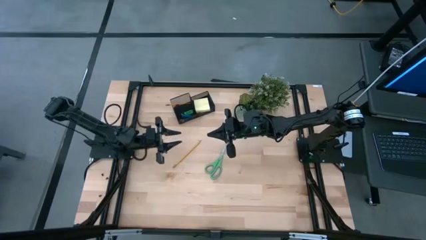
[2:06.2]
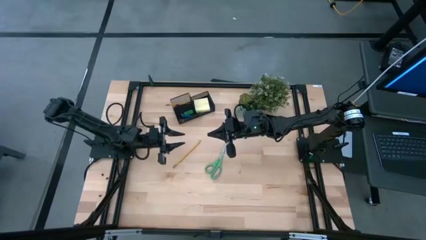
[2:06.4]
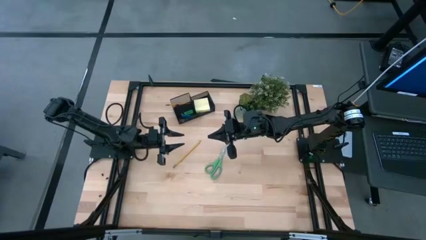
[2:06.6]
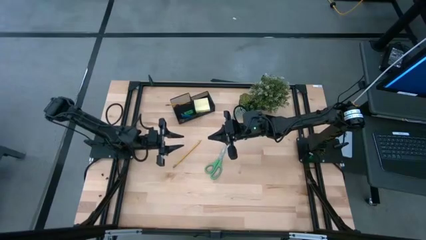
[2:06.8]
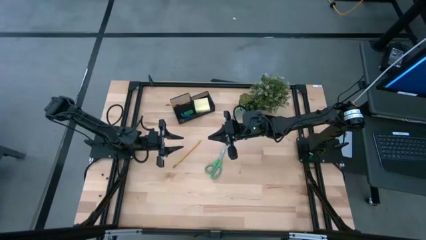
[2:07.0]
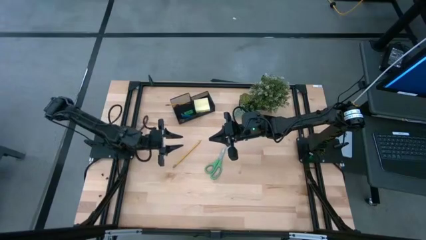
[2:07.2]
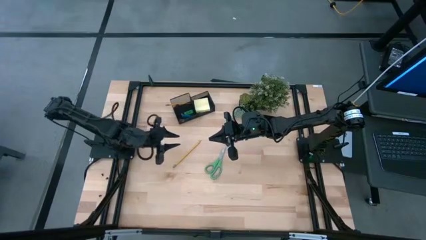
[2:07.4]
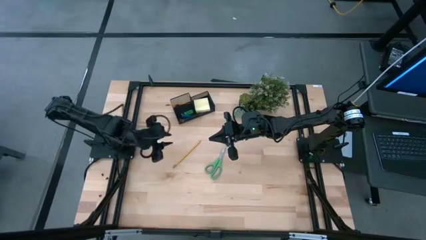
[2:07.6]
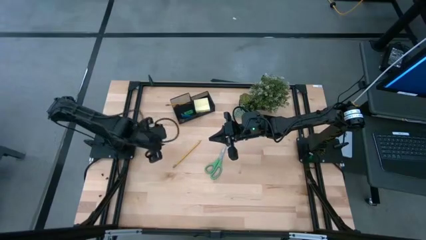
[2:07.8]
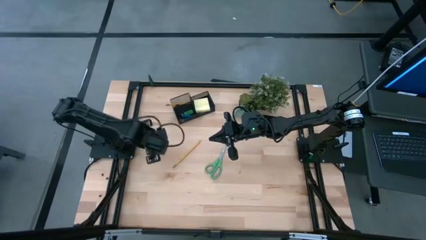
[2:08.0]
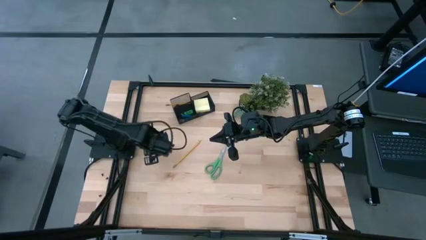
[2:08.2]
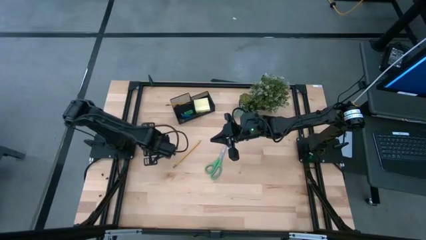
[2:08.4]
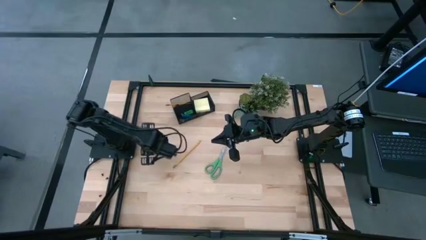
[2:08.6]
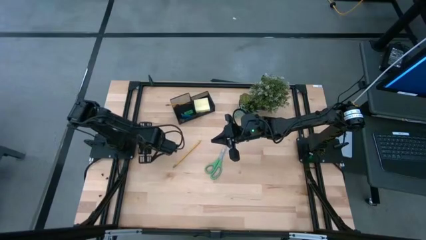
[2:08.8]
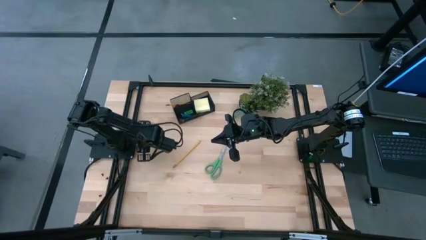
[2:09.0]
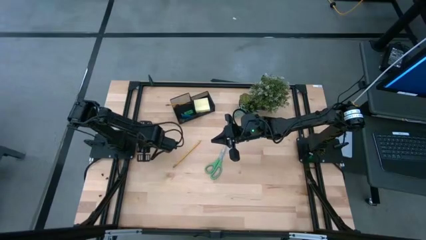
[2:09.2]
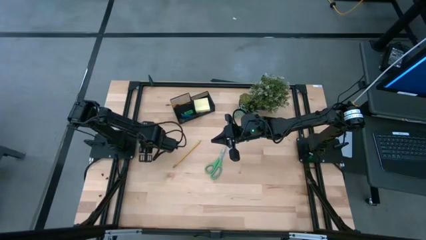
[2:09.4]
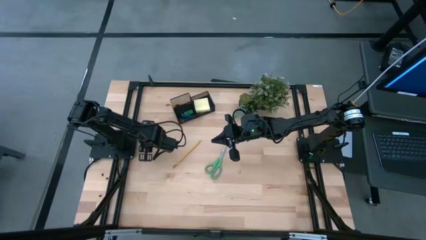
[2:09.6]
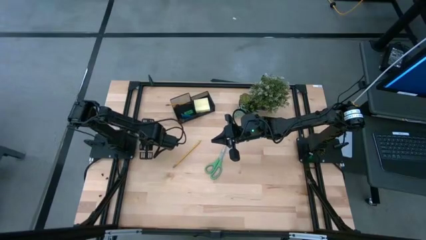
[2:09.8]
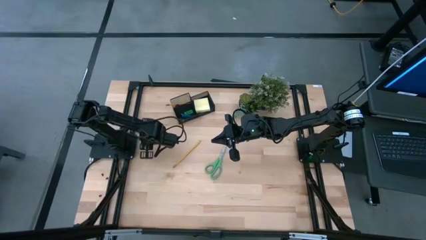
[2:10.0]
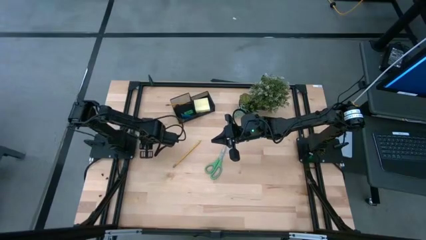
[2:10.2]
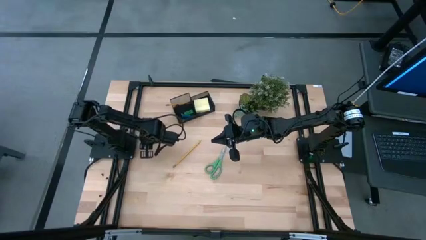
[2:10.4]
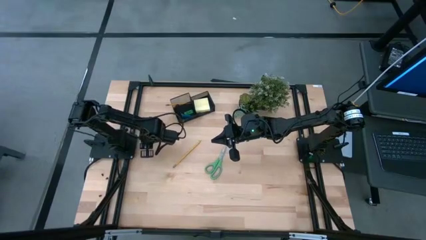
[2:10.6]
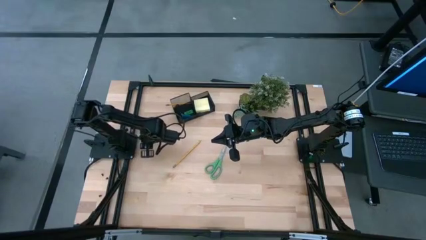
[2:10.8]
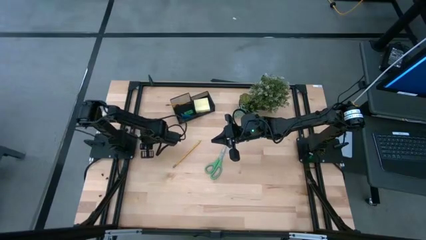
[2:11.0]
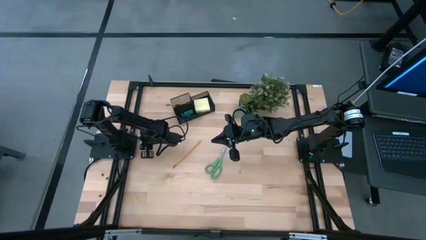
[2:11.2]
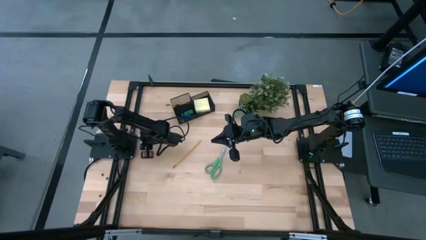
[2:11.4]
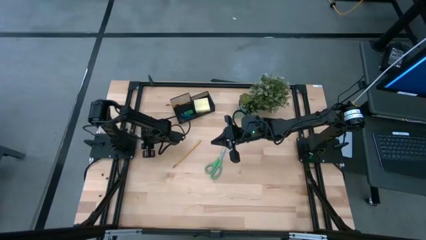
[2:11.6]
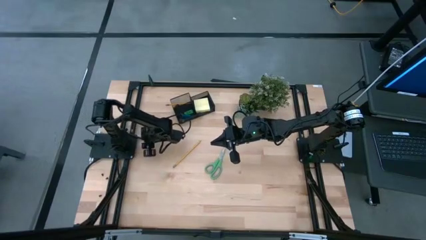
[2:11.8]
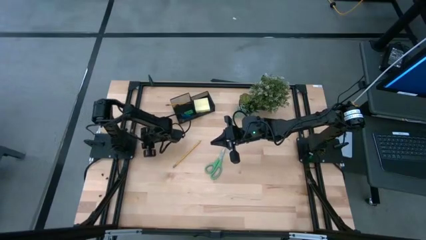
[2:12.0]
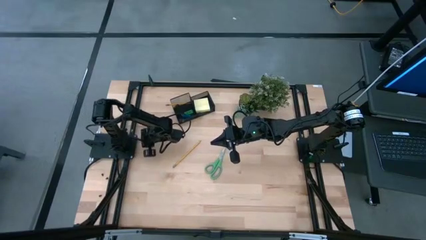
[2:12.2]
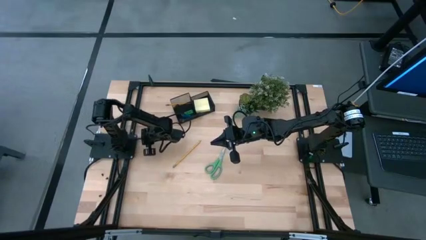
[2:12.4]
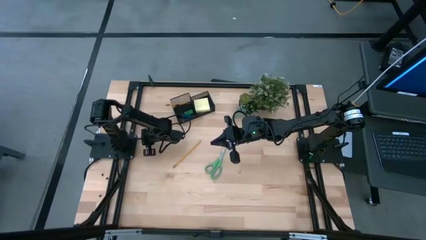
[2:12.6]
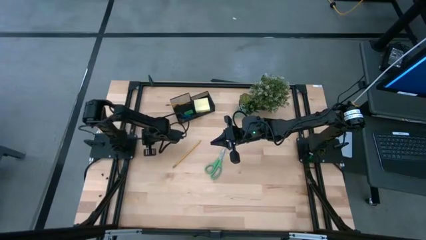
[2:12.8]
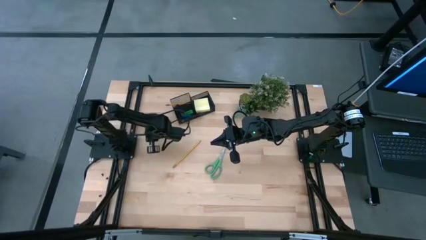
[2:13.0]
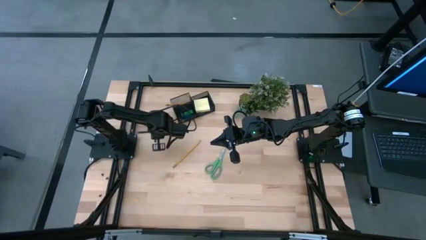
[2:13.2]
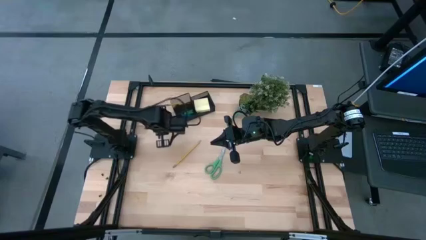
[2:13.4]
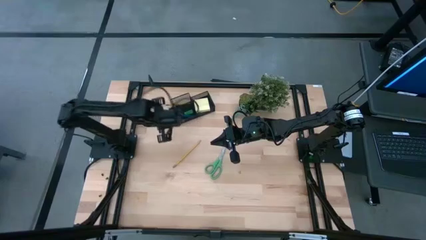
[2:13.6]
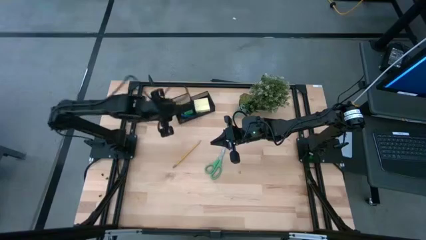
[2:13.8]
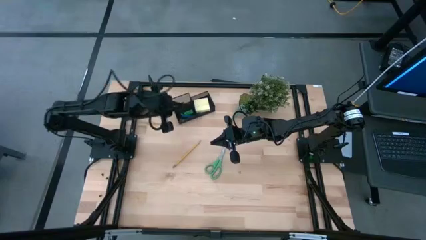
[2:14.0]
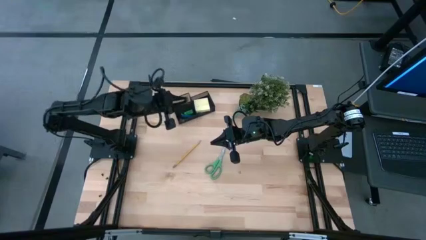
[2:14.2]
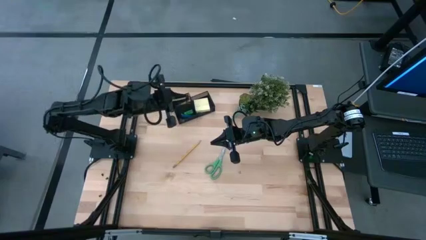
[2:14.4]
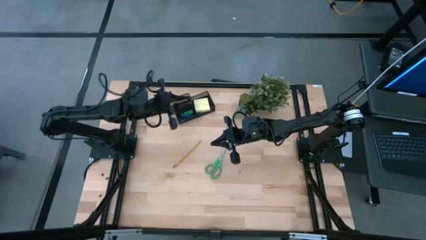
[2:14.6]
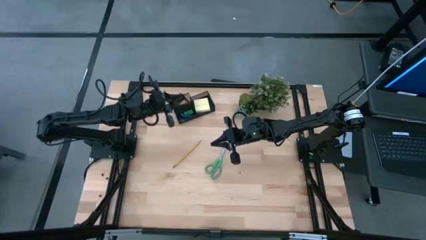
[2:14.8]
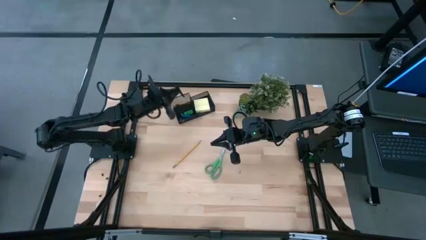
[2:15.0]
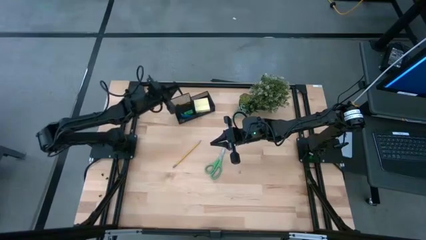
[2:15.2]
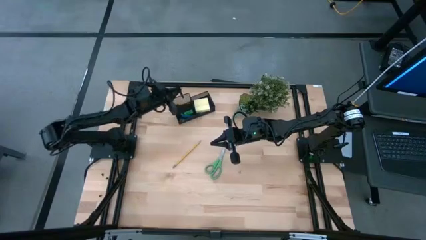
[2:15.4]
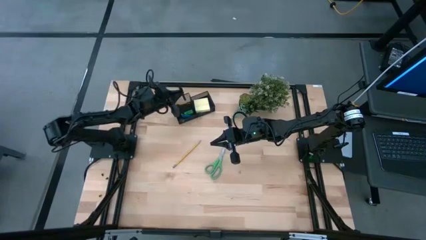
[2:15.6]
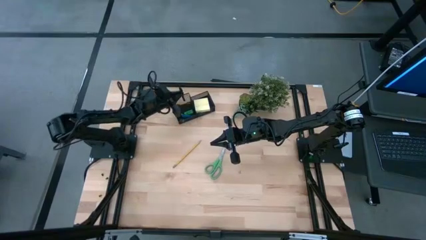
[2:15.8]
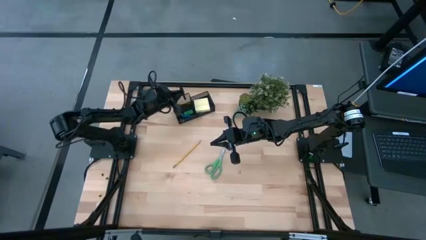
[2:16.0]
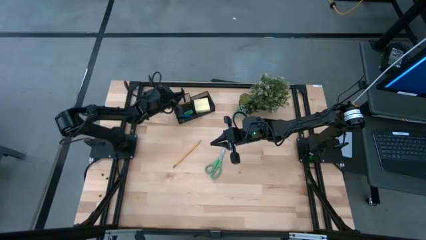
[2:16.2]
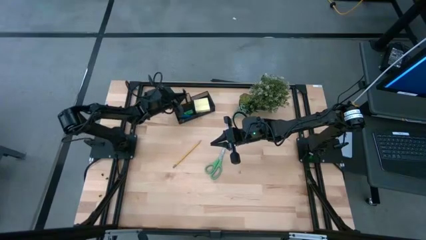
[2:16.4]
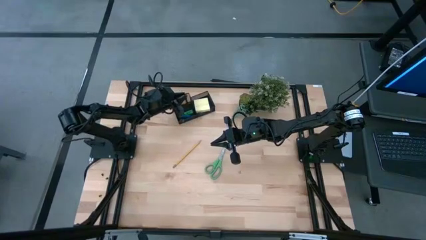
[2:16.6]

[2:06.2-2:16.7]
Task: Pick and place office supplies into organizer
Put the black ball pen into the black desk organizer

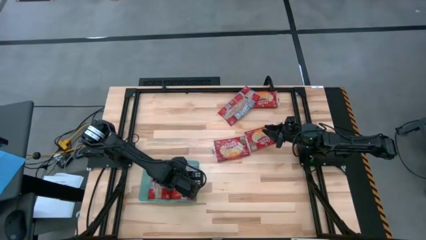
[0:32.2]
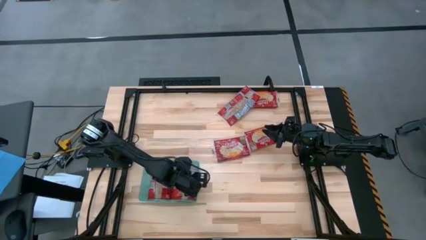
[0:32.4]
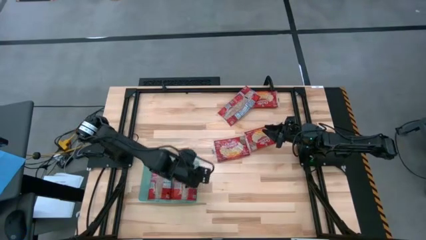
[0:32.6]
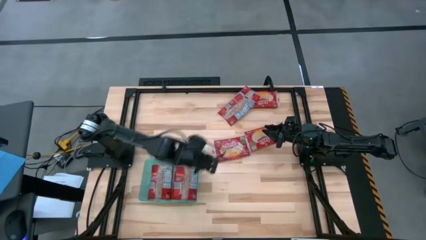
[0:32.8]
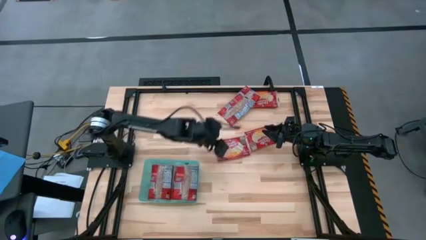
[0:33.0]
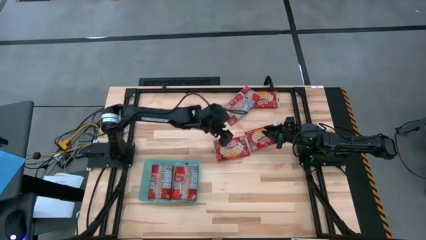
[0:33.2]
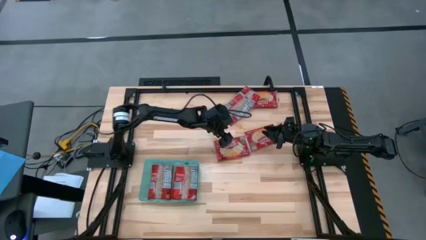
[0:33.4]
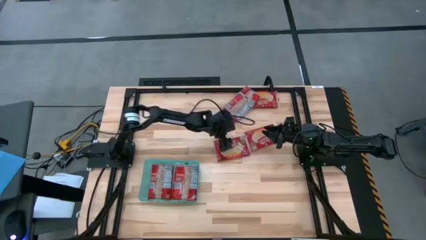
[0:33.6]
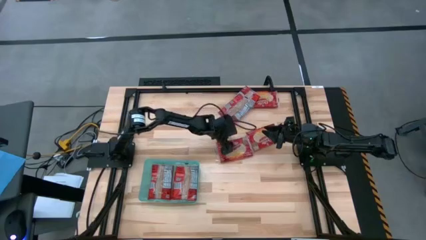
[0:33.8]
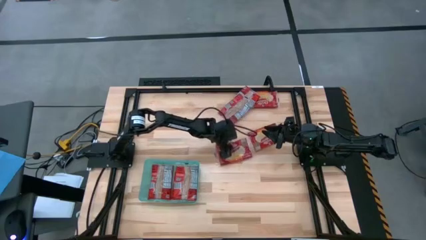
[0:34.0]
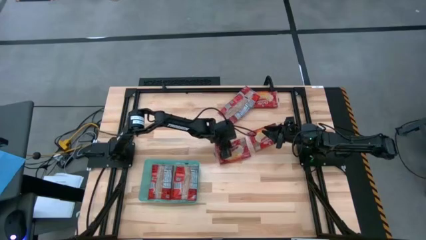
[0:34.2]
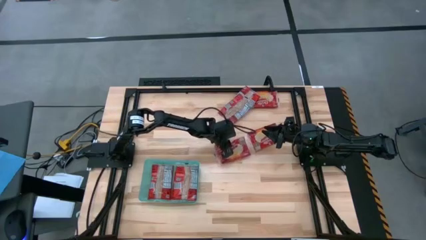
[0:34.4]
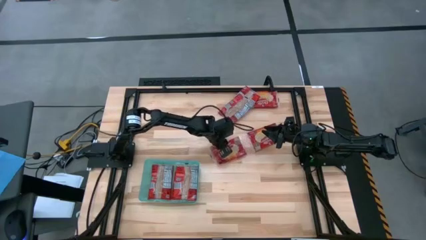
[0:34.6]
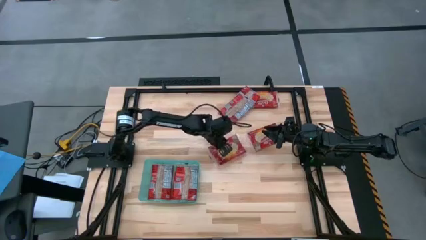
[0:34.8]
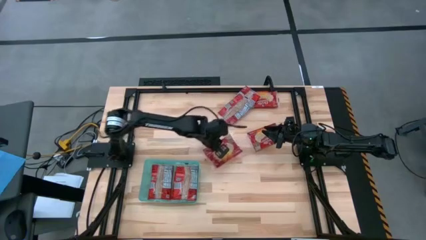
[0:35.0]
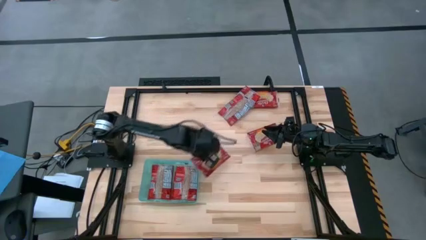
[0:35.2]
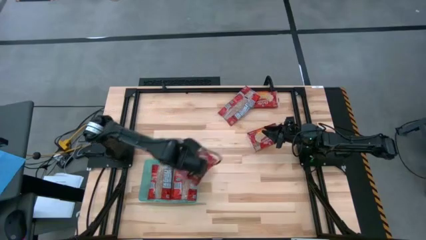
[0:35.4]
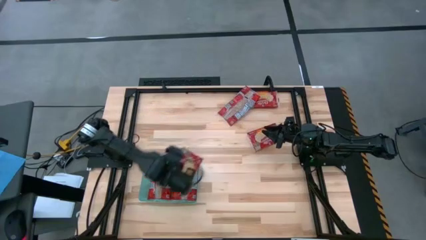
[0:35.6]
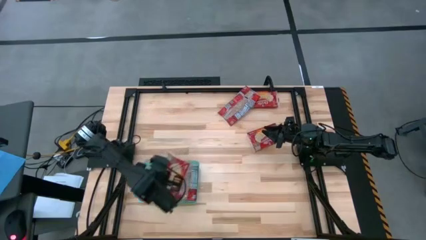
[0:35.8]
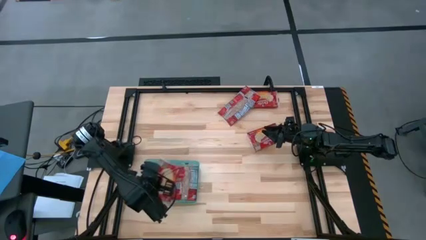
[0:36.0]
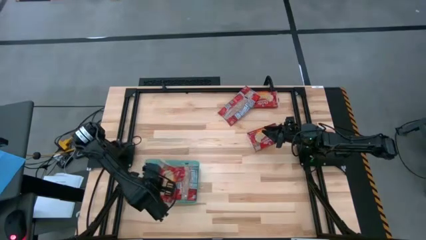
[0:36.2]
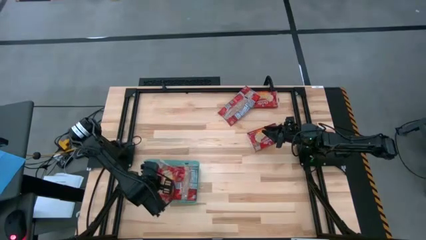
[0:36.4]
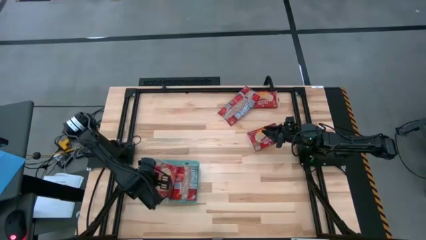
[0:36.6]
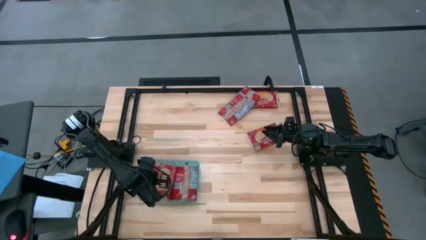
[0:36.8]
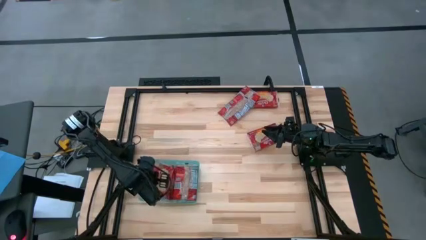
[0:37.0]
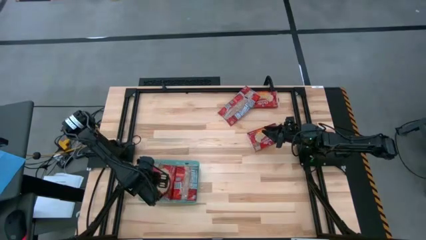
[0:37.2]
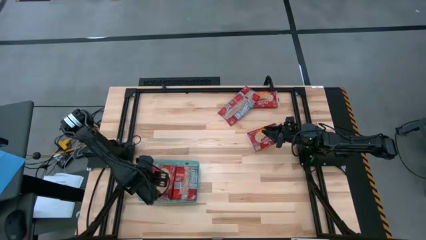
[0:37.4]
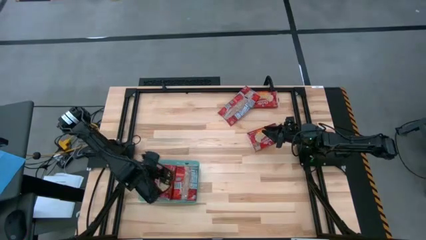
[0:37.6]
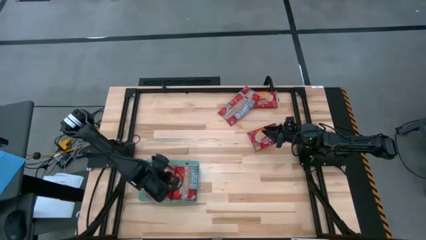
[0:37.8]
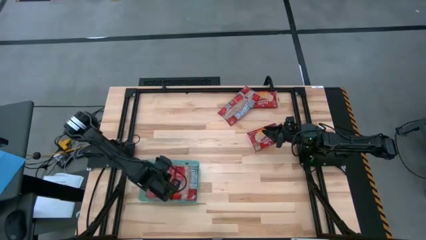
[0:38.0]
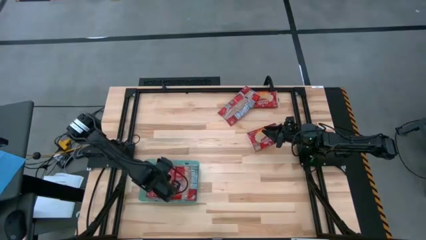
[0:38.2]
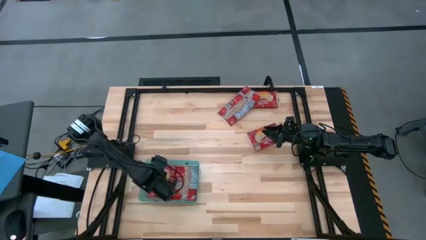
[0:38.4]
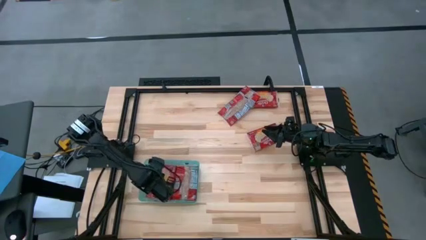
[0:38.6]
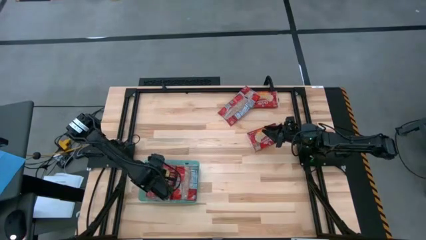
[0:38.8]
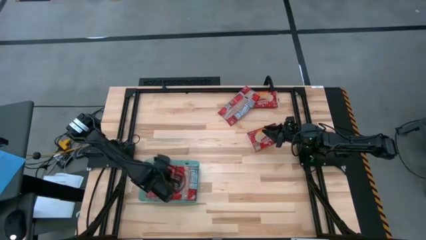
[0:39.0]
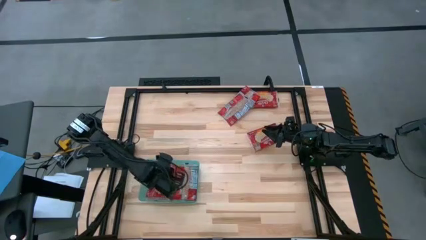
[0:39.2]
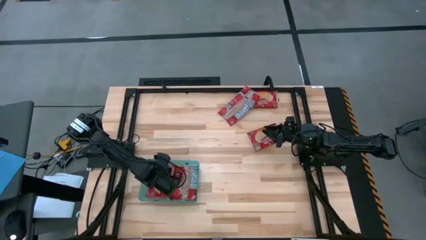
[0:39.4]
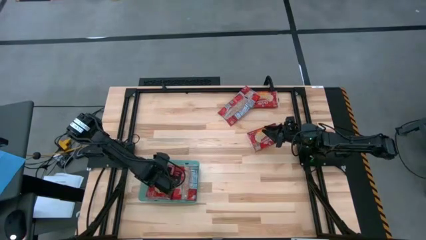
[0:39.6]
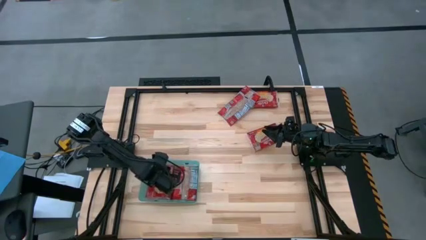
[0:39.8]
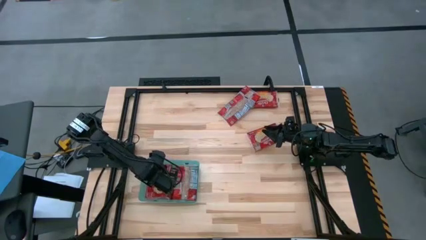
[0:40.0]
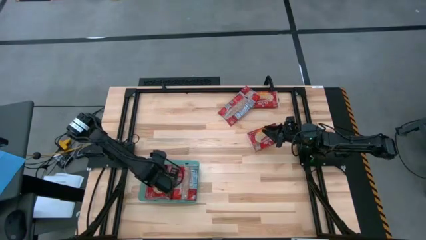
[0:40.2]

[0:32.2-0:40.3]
Task: Sort popcorn bags into baskets
Put the red popcorn pack into the green bin
